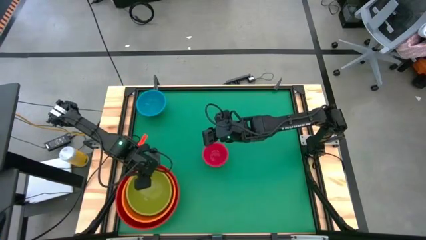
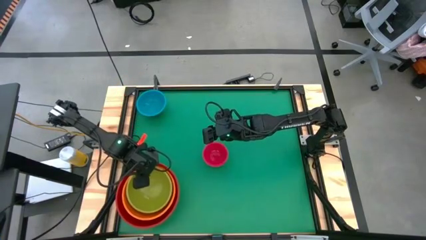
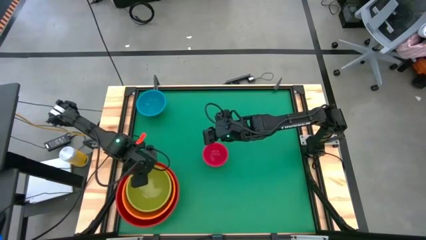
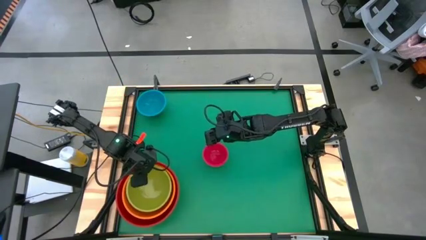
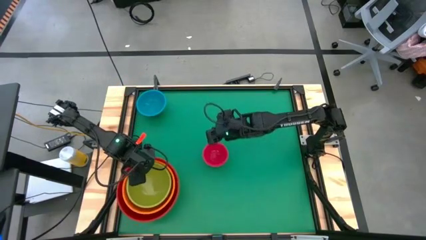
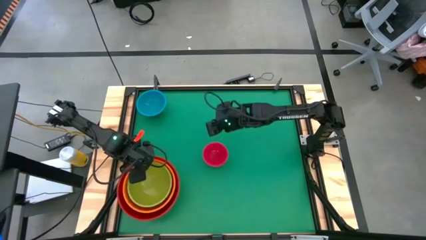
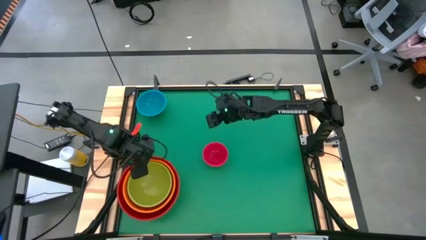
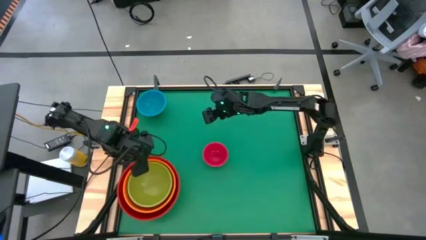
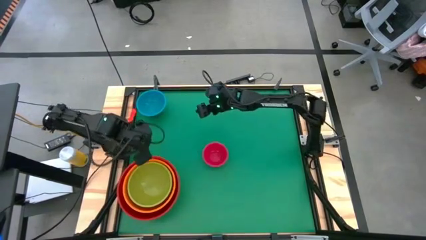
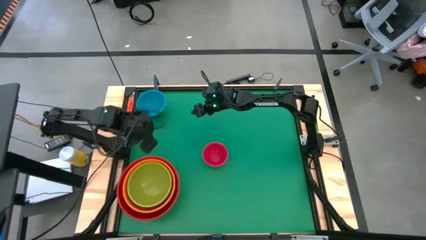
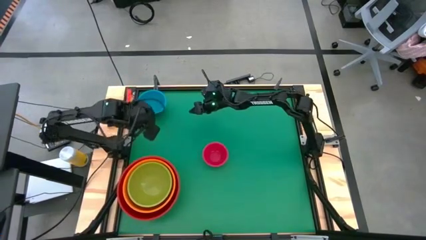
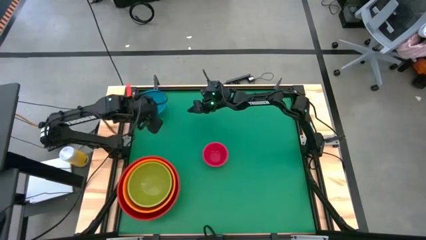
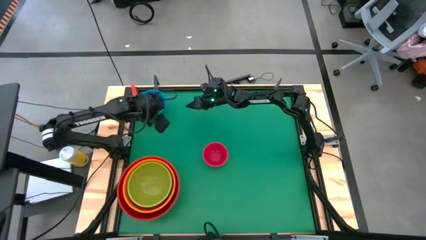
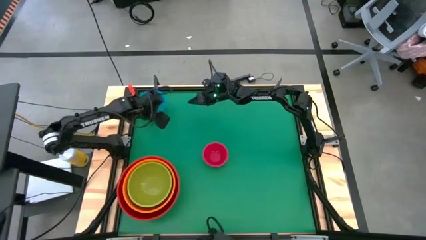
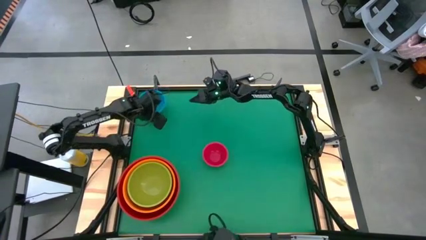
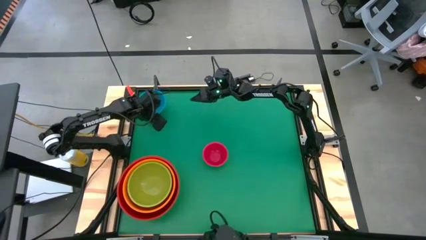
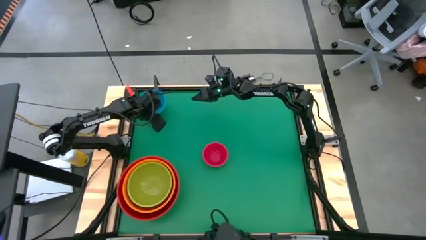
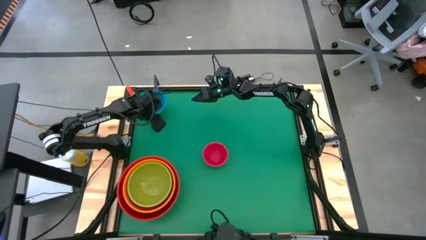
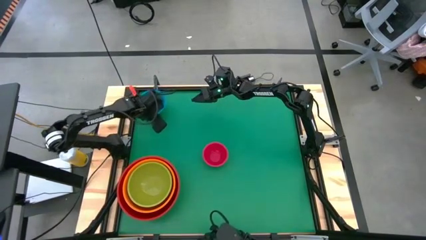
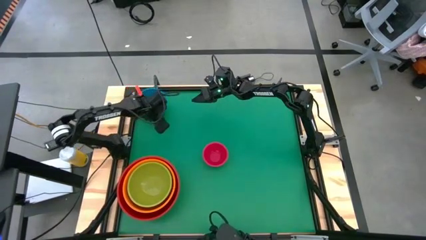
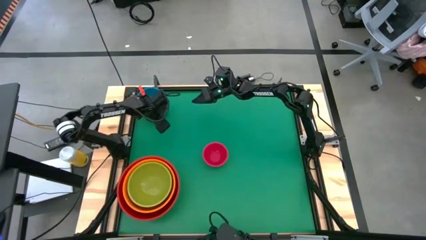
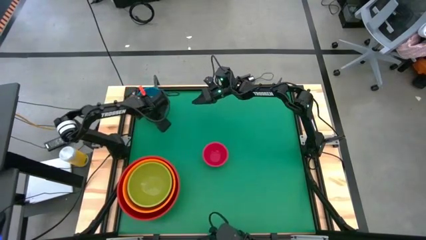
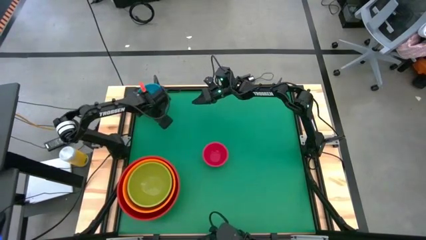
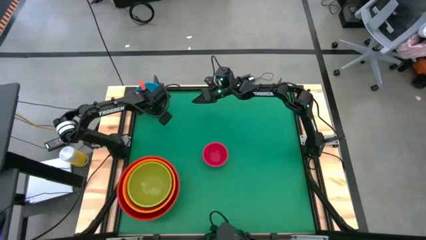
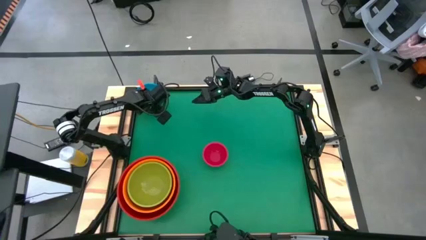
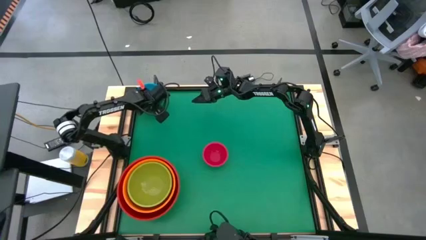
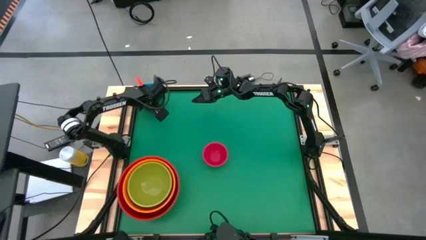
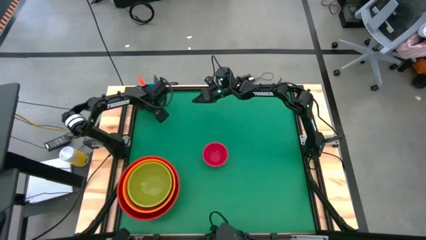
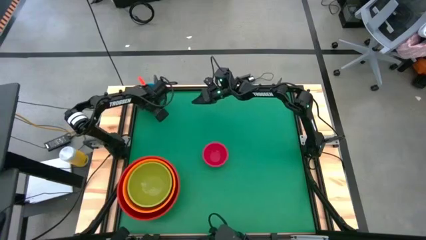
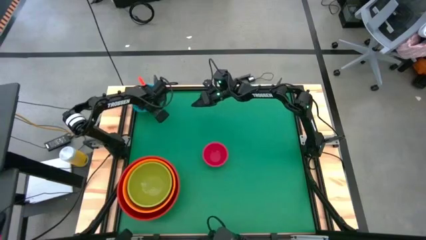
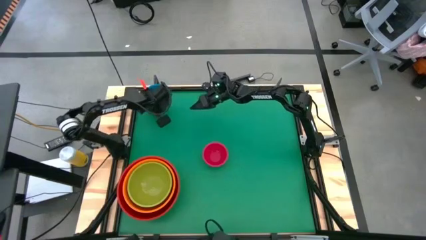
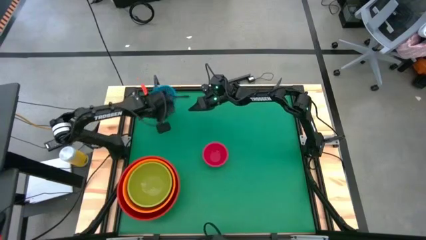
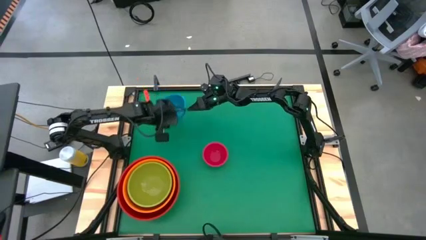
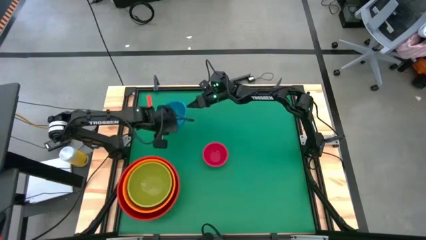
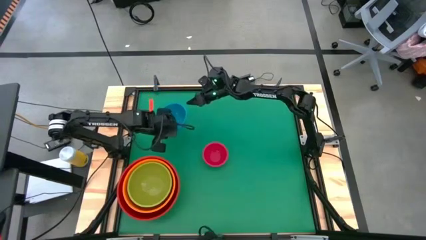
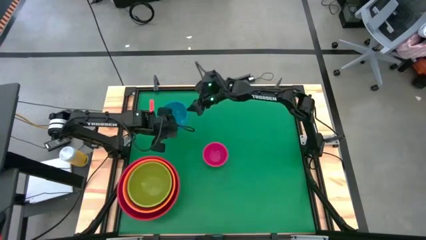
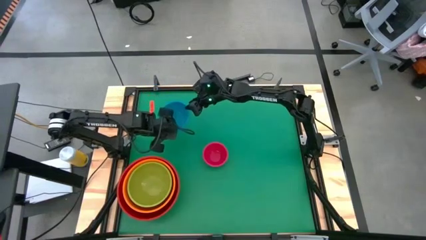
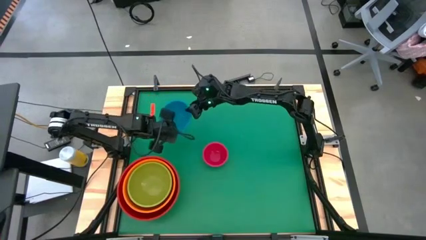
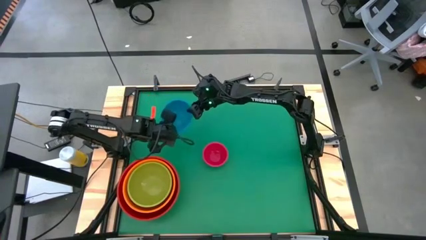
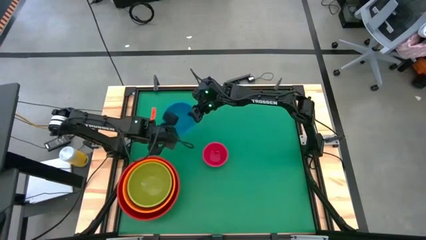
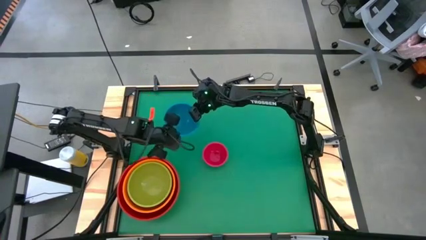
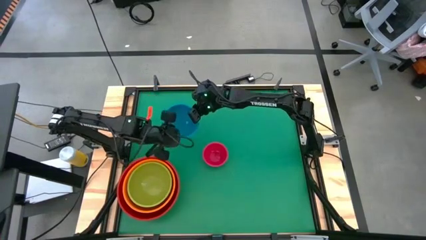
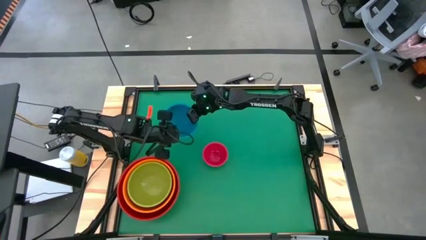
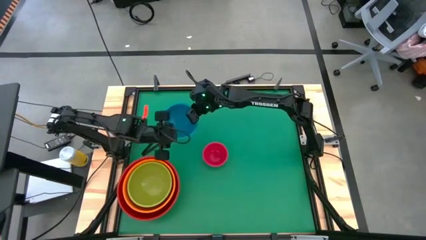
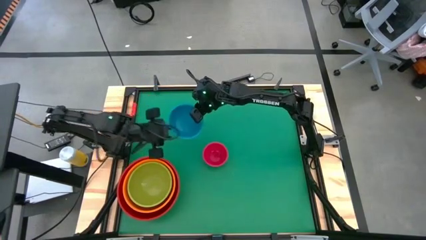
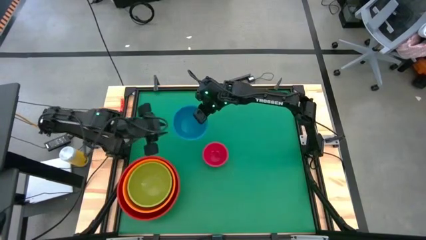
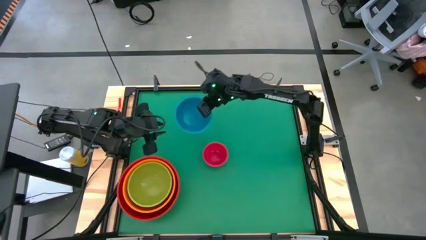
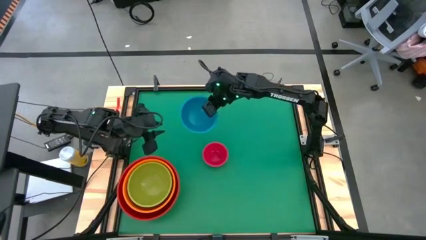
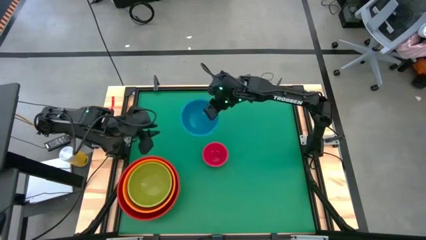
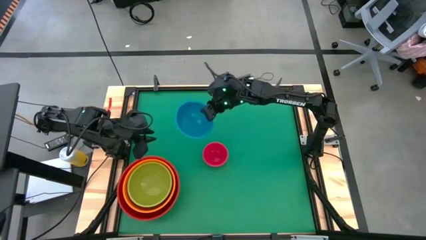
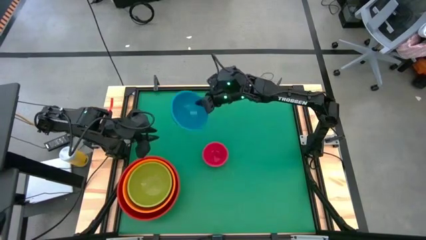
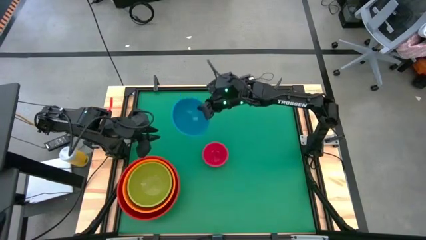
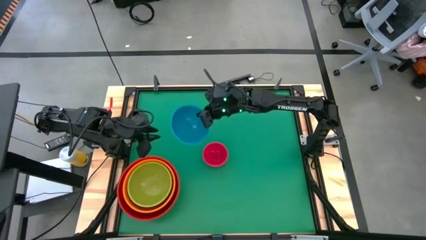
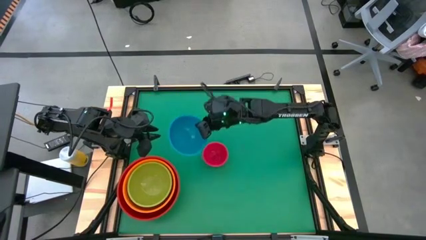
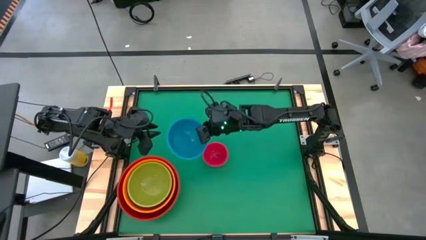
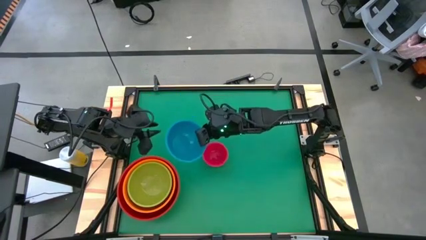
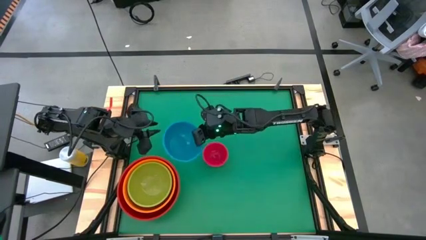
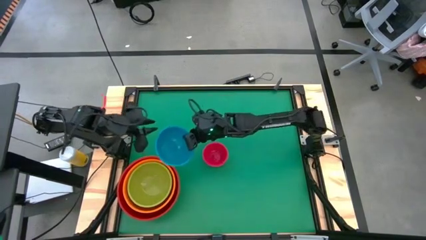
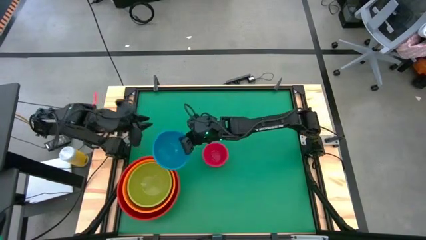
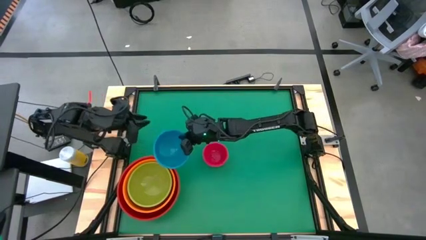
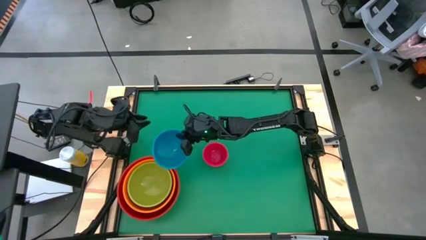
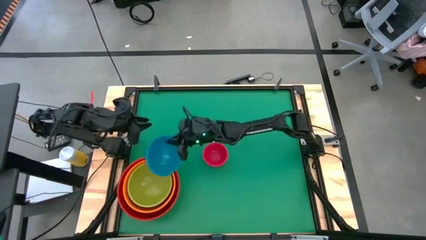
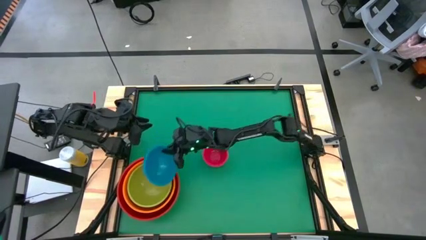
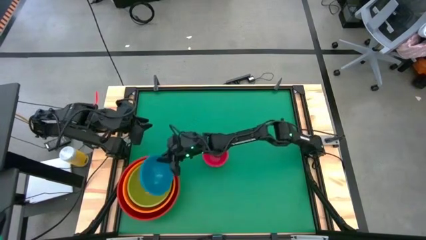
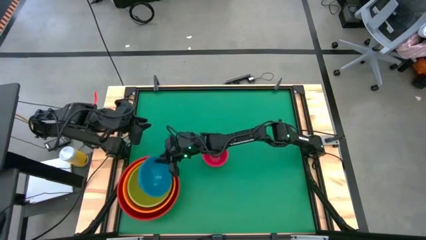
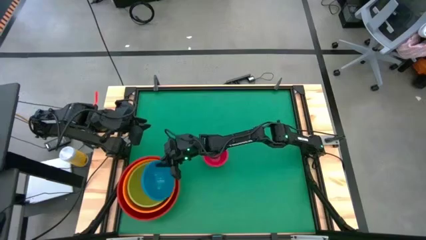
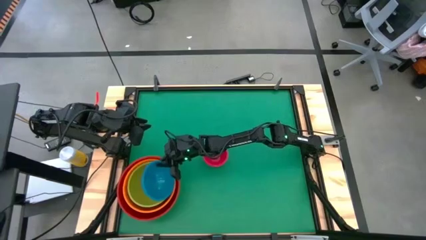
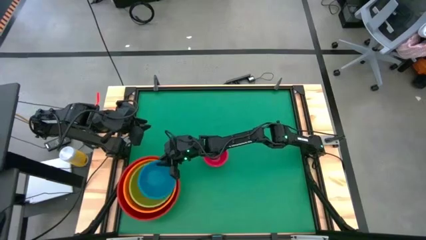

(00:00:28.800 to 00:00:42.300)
Stack the blue bowl into the top of the green bowl
